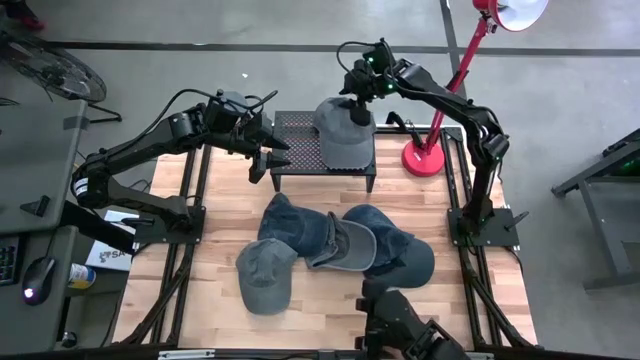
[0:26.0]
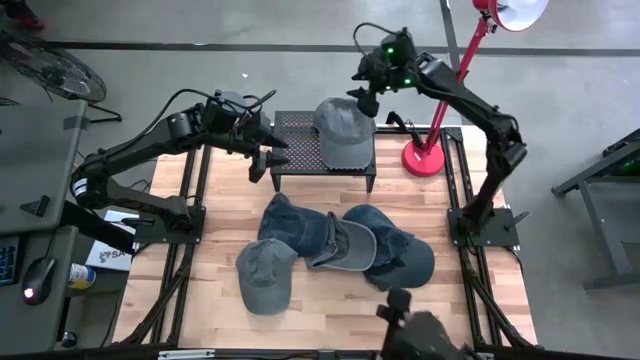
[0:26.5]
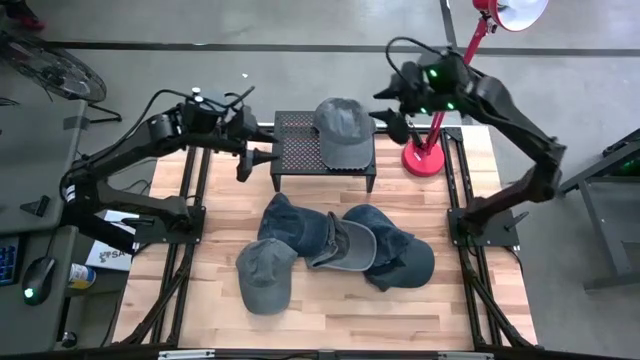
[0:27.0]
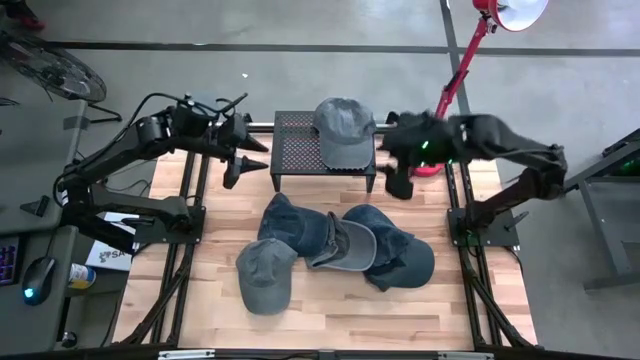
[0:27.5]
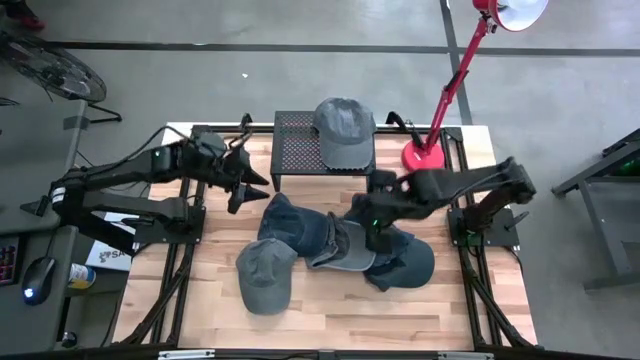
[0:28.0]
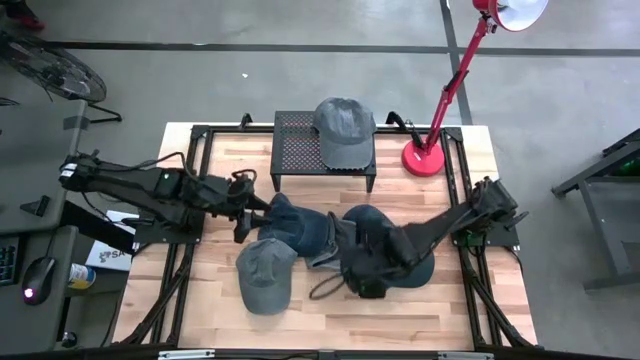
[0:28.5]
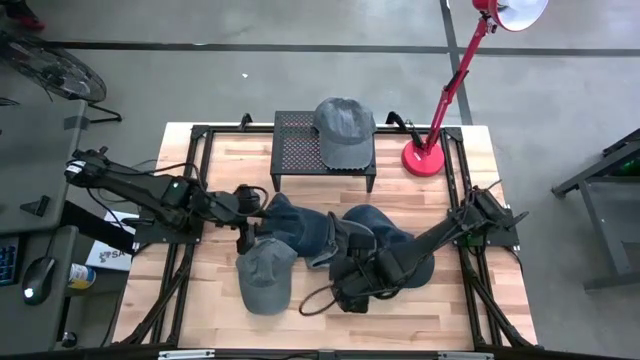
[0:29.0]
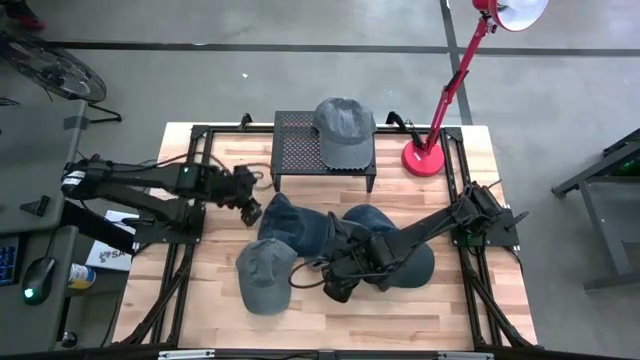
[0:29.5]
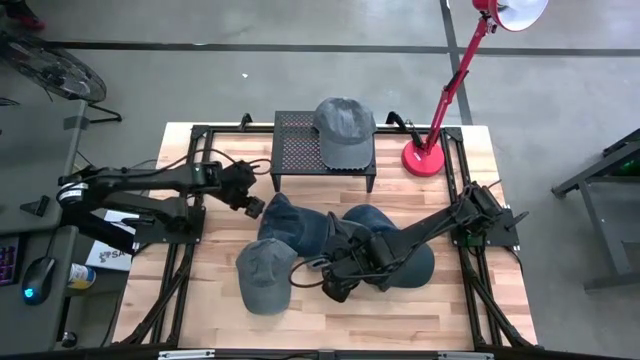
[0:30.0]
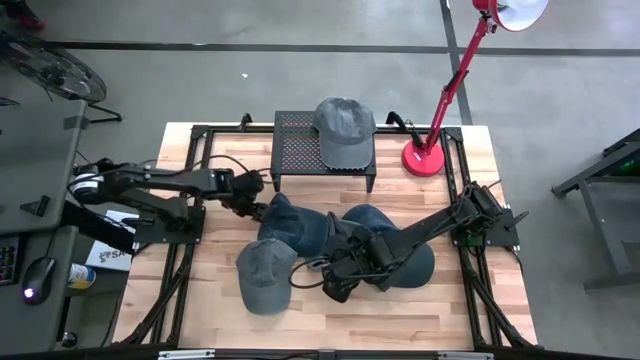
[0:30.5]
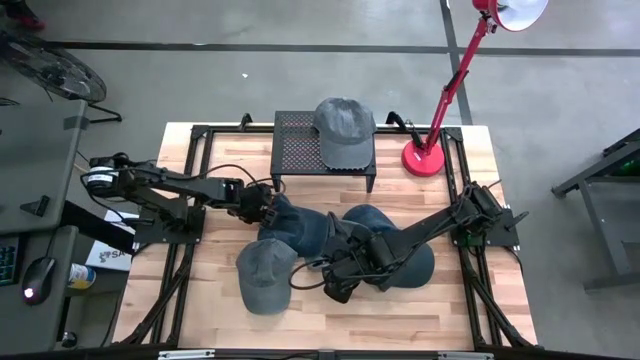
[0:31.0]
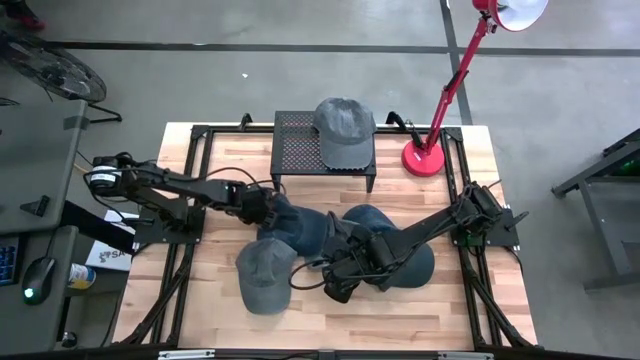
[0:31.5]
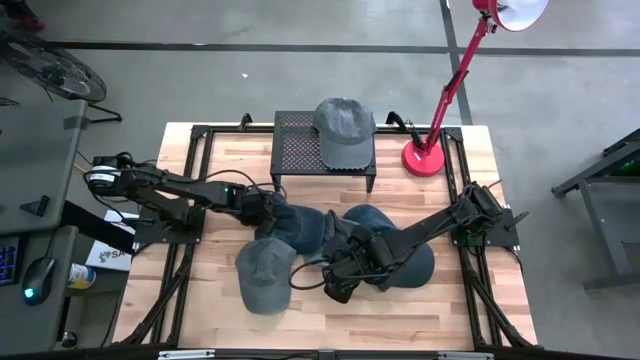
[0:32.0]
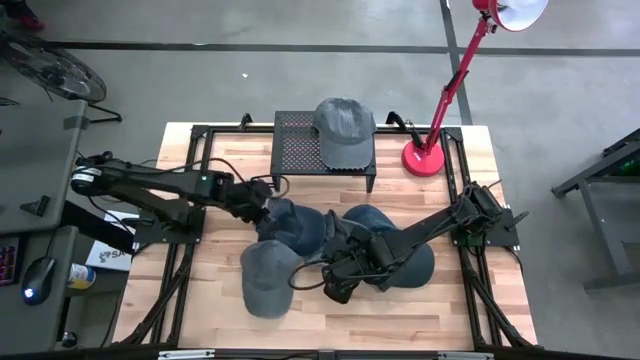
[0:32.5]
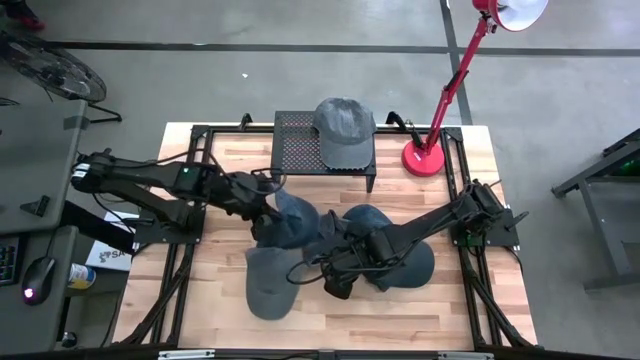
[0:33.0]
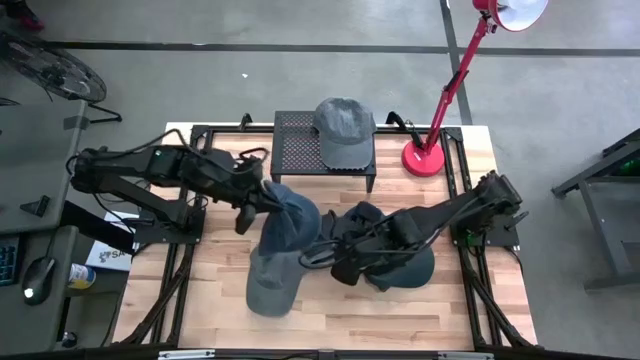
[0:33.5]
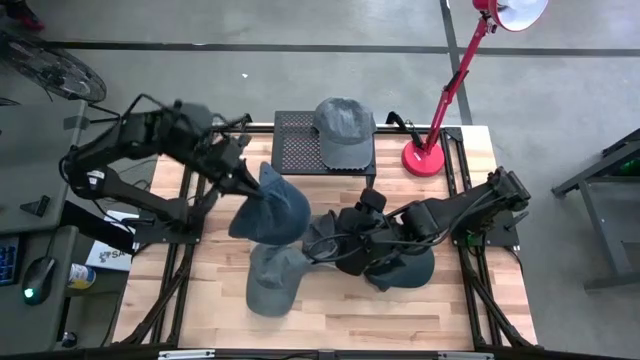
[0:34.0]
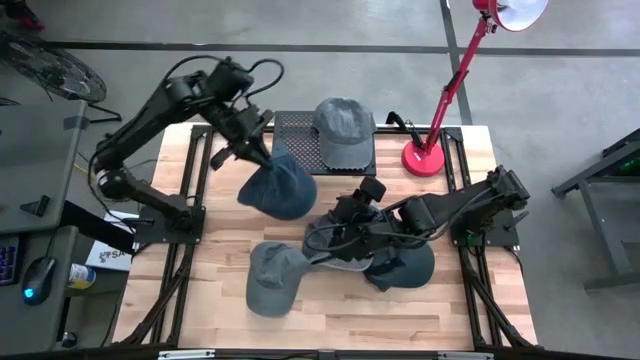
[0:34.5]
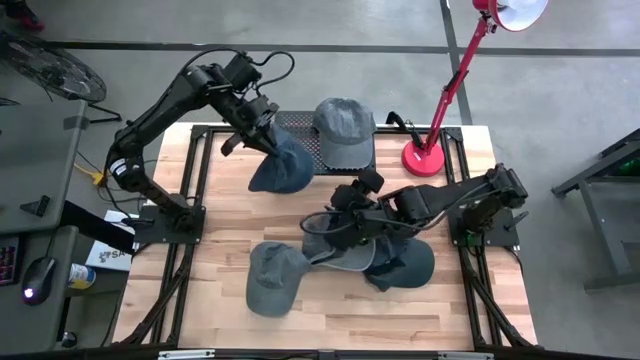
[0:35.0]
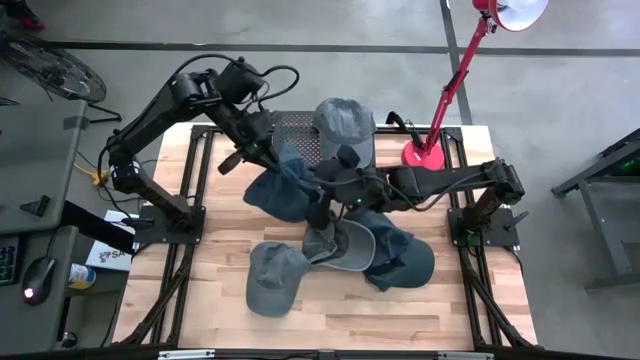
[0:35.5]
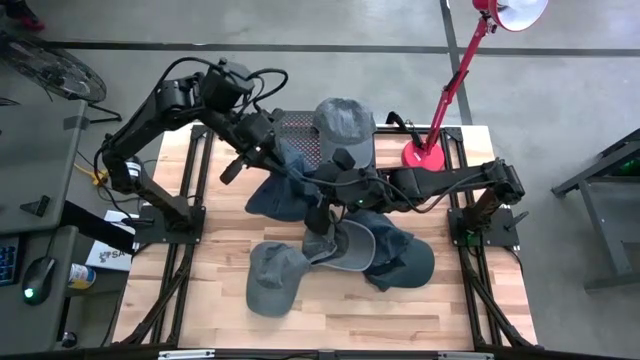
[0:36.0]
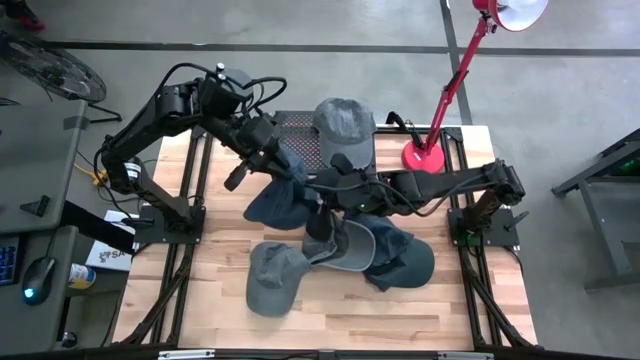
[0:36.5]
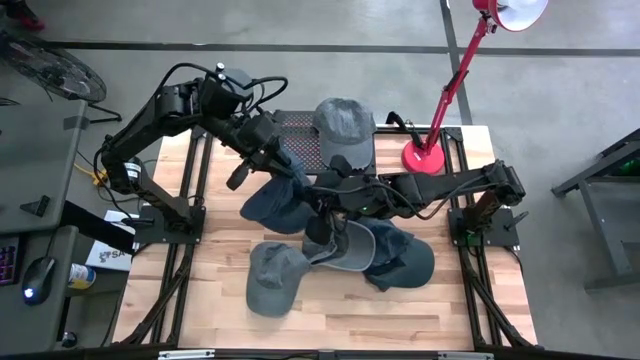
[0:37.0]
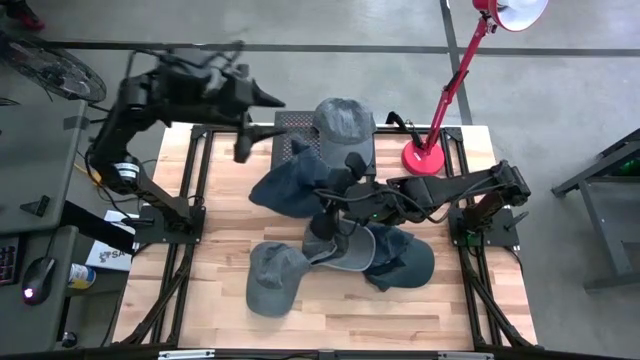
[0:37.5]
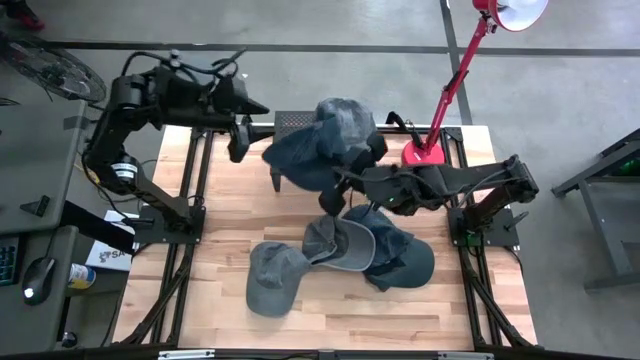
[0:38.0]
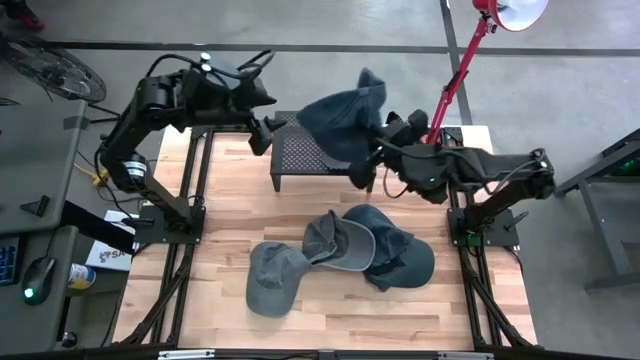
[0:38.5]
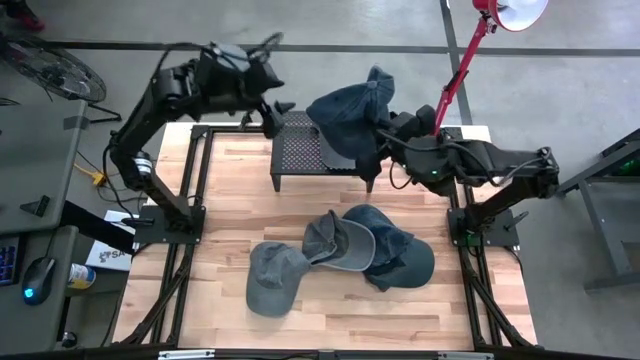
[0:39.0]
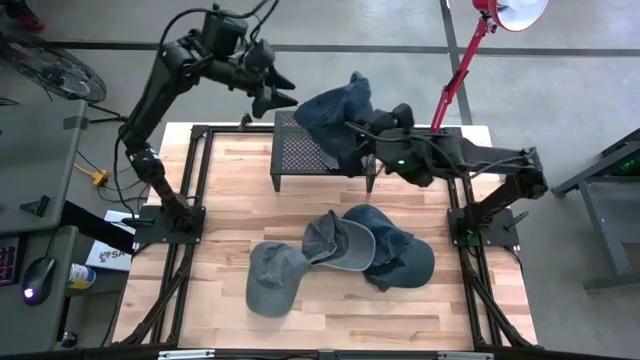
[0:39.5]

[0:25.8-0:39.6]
Task: Pick & Place hat
Put the left blue cap on the shelf

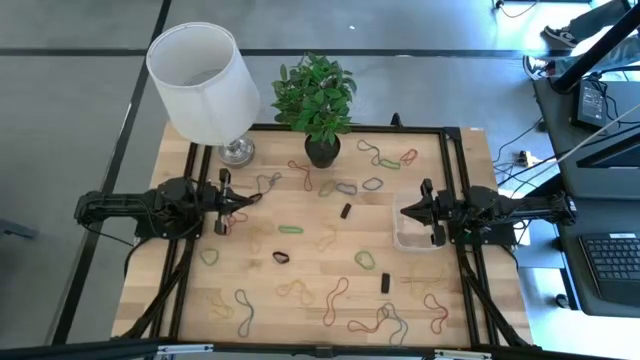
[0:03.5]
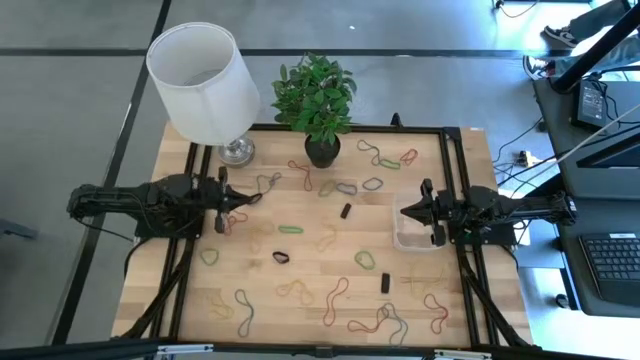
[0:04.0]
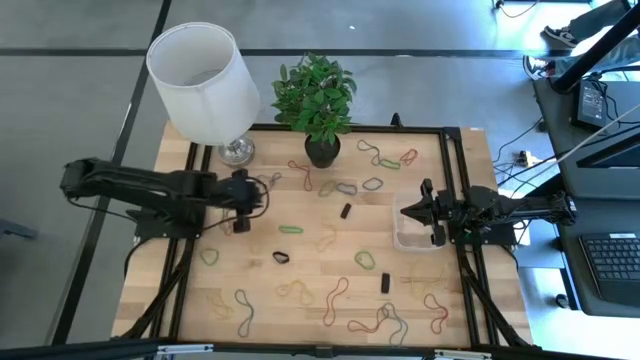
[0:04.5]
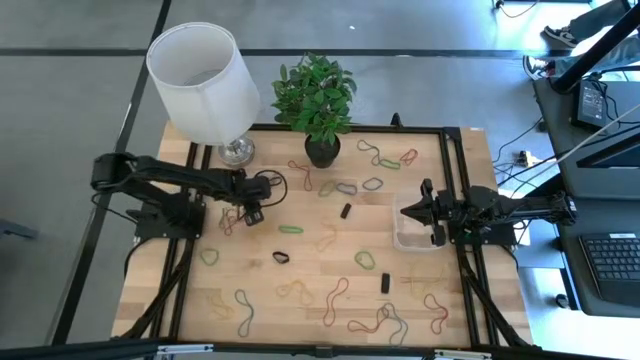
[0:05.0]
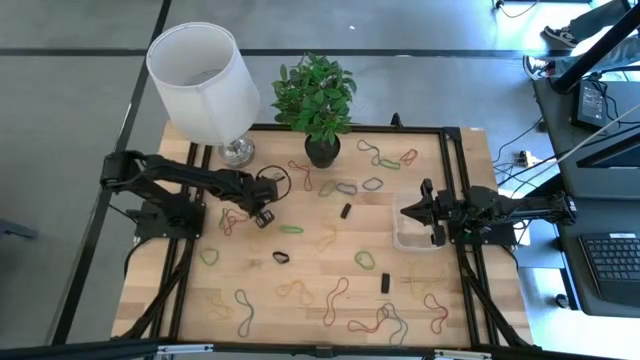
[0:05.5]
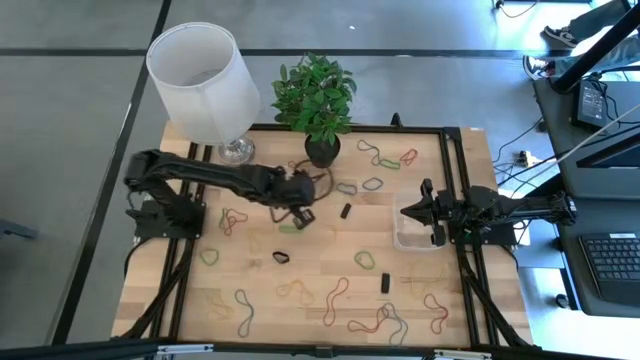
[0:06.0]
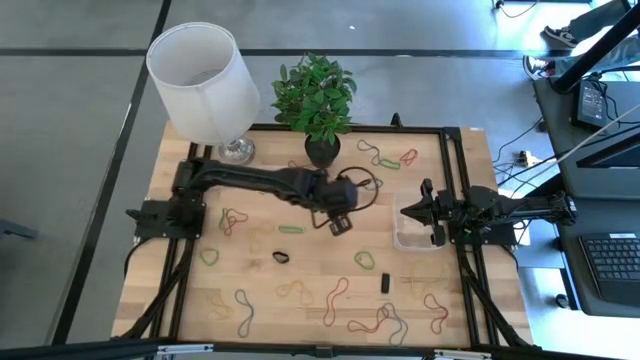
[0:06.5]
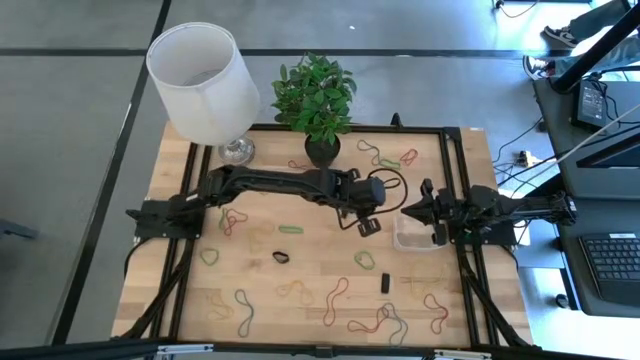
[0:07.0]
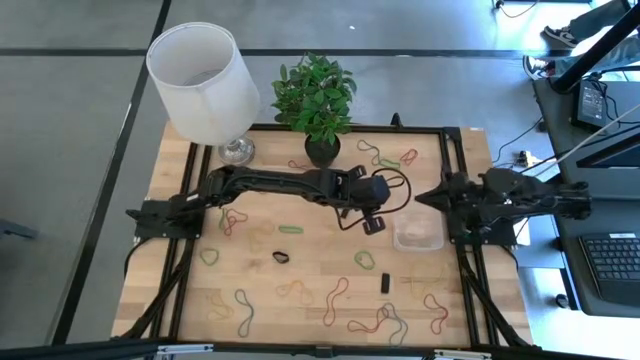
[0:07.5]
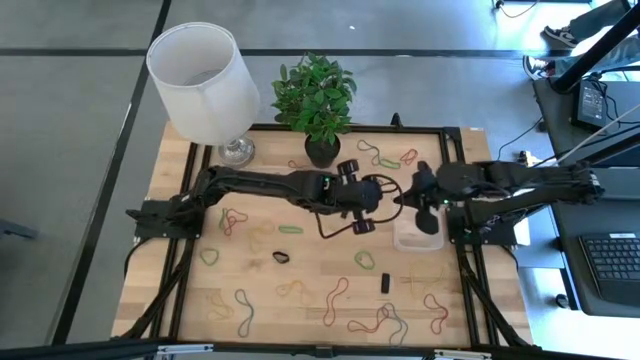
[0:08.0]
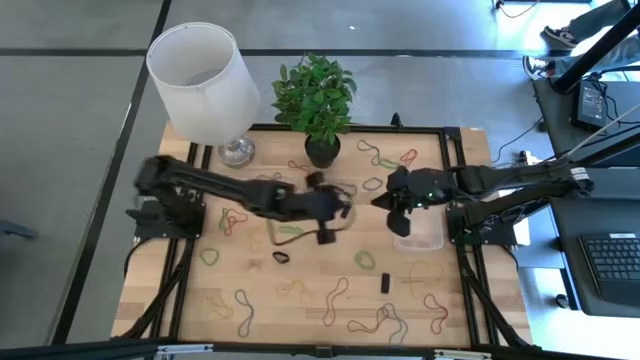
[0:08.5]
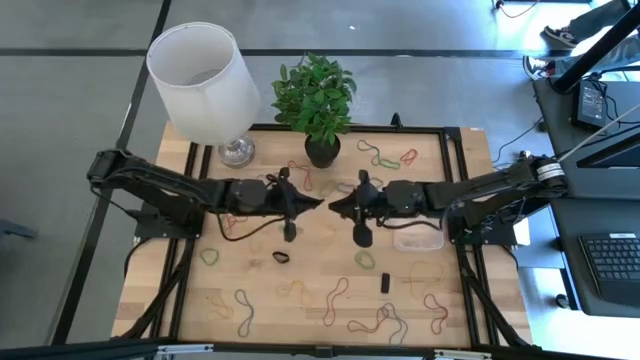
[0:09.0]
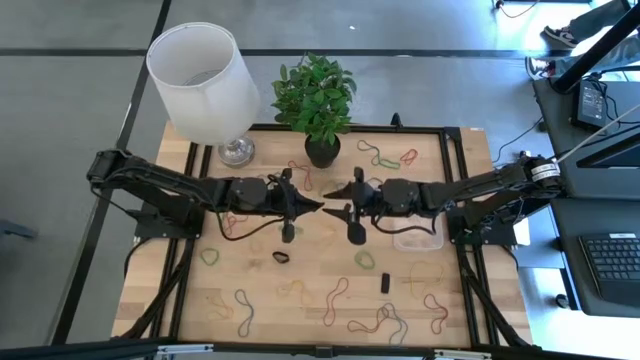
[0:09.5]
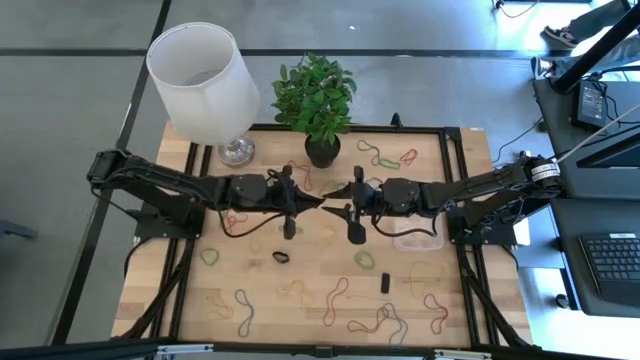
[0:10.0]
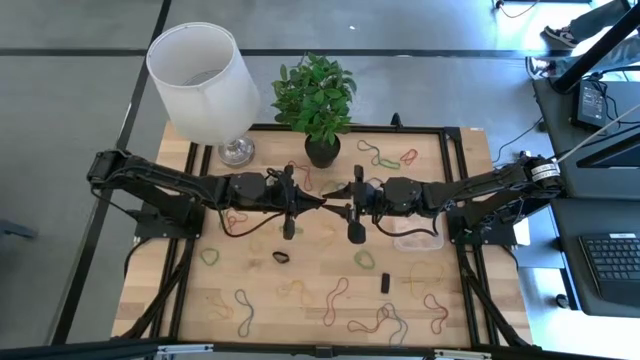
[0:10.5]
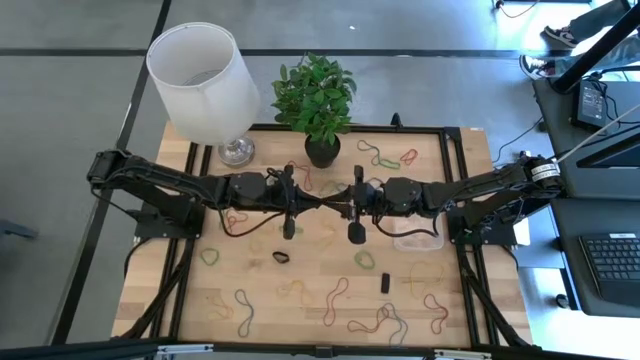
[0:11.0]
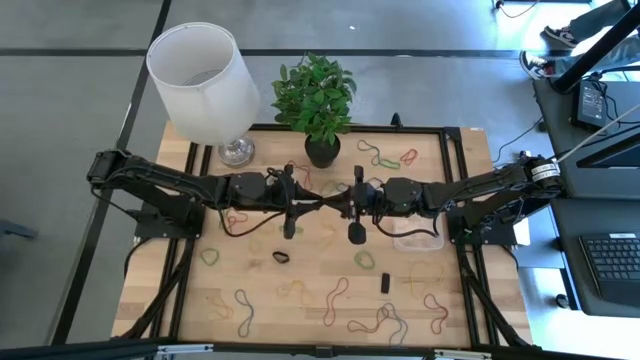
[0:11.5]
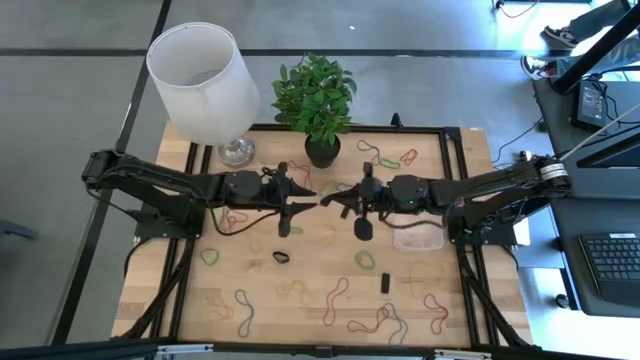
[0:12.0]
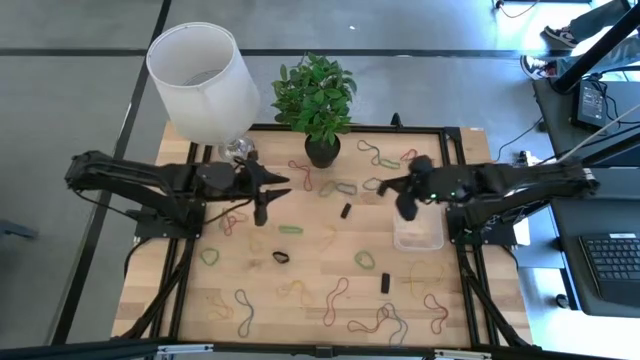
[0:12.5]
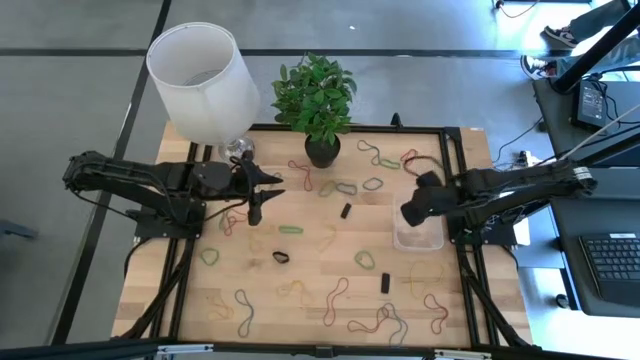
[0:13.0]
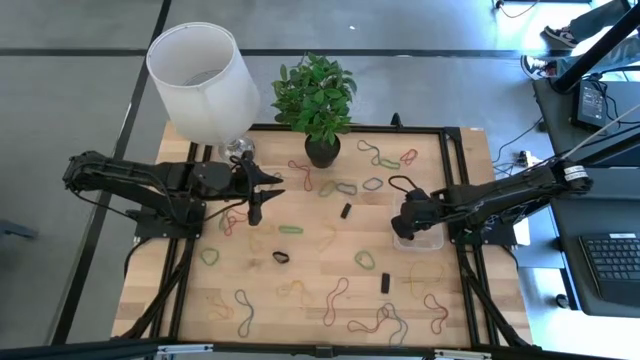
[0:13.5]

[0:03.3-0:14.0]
Task: Pick and place rubber bands into bin
Put the black rubber band into the transparent bin
